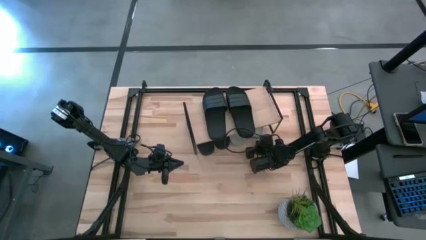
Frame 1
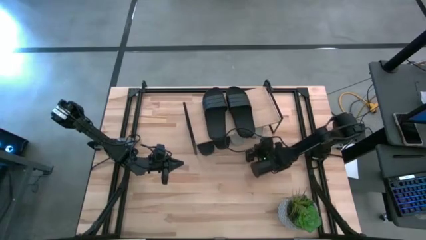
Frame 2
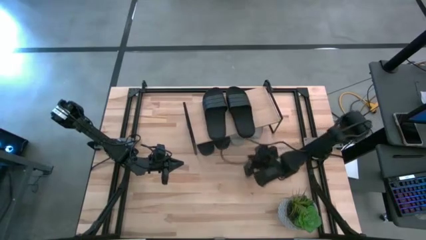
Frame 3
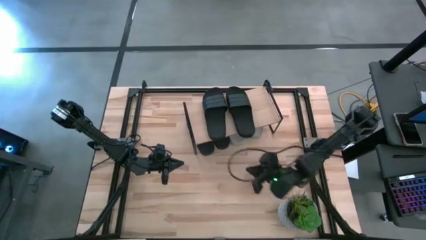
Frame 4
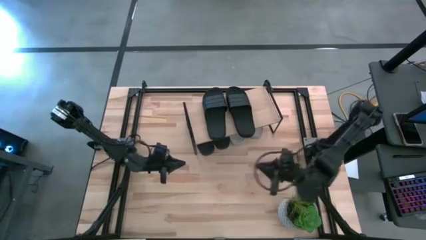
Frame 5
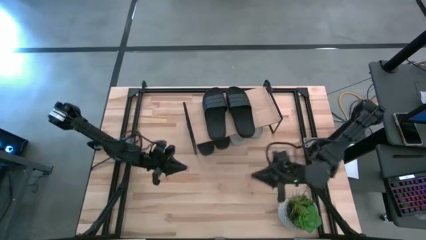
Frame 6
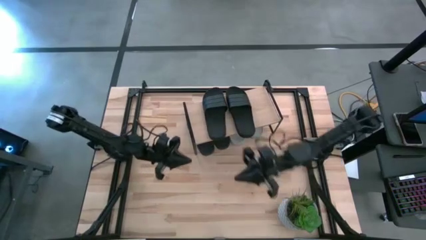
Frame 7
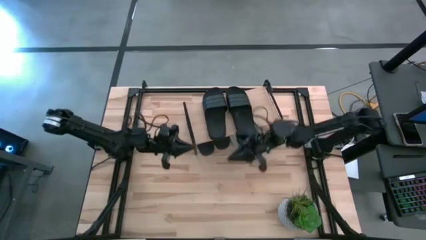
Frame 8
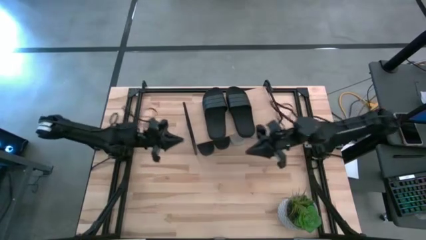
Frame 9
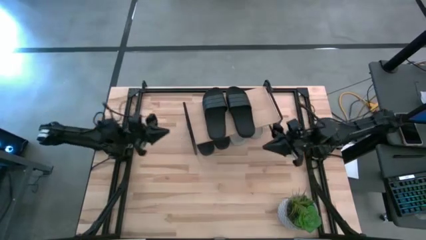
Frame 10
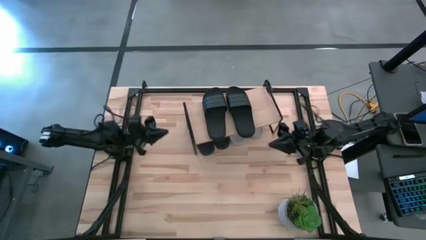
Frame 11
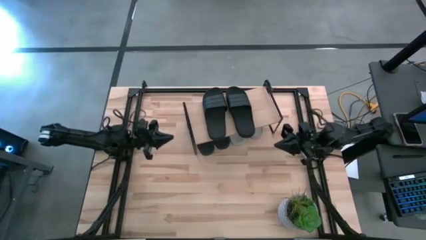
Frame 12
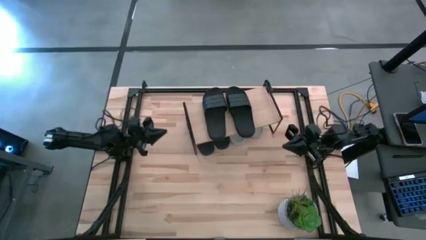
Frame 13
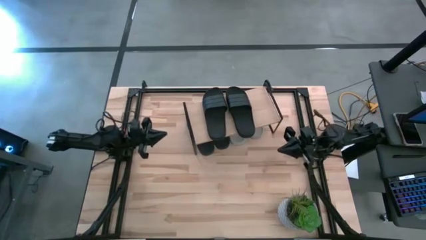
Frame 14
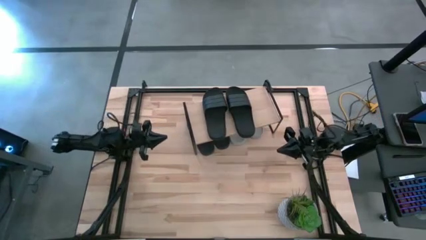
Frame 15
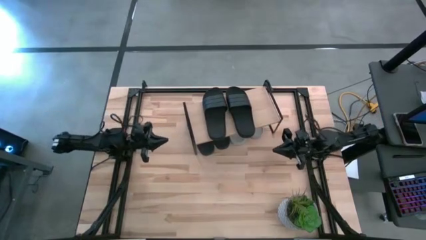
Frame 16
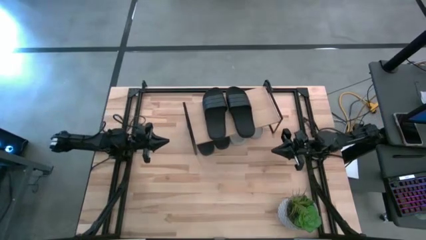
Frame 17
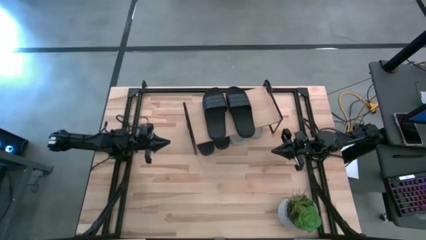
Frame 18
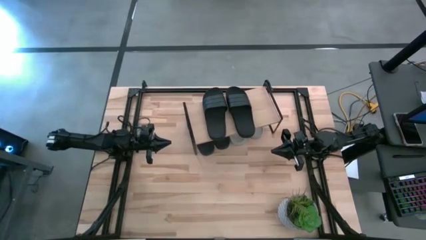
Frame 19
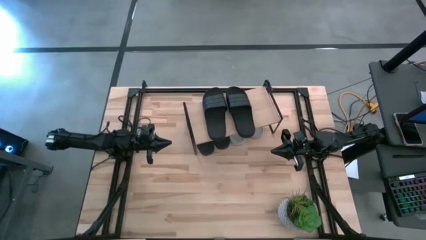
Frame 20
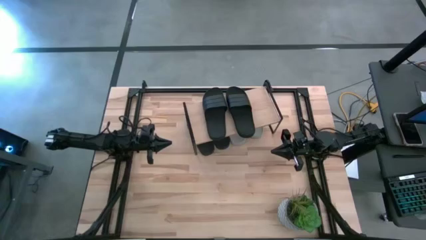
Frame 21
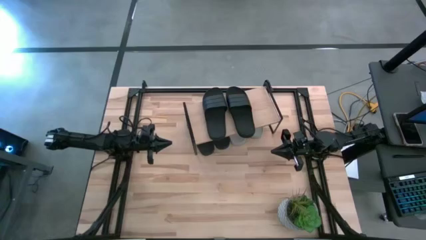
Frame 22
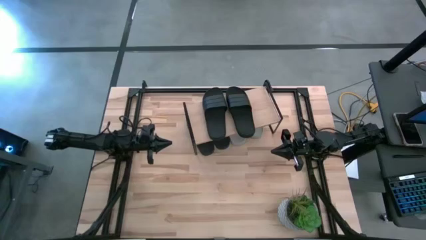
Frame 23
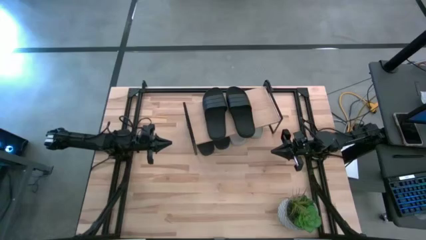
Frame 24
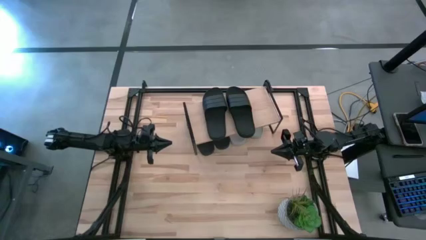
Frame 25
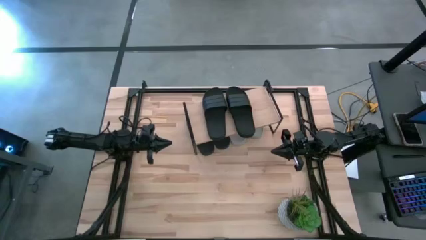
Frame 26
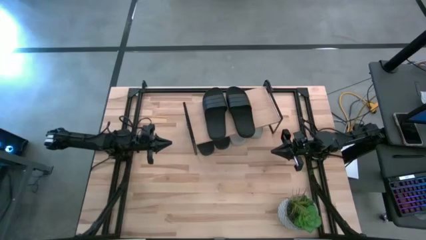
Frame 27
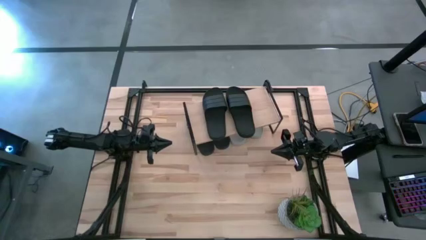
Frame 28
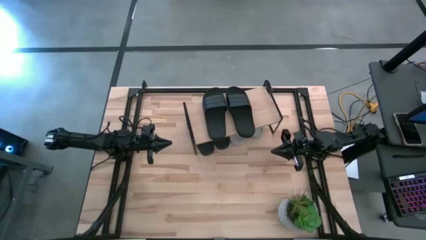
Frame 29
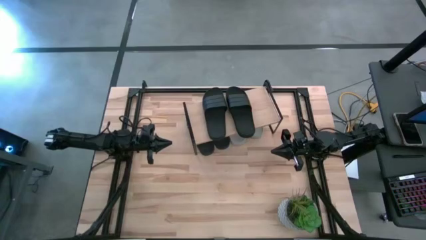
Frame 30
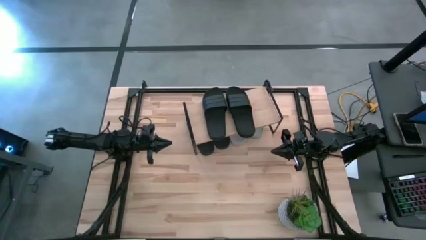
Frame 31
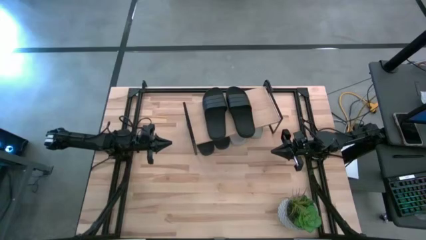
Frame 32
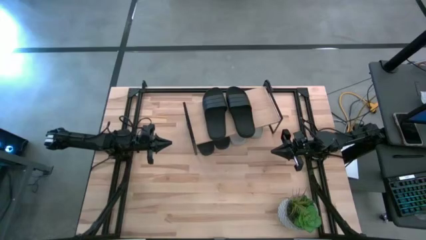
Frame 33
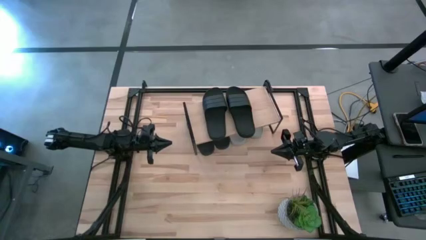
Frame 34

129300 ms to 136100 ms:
Task: Pick and place slides into the shelf
Return to Home Position

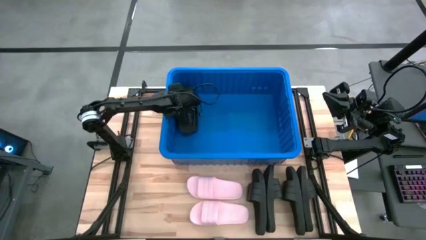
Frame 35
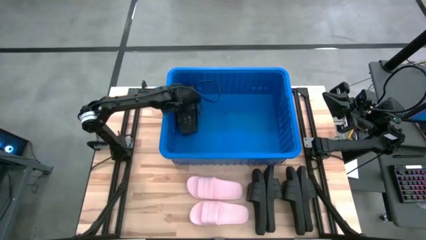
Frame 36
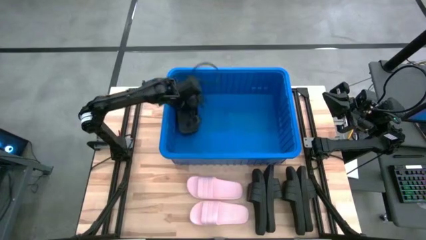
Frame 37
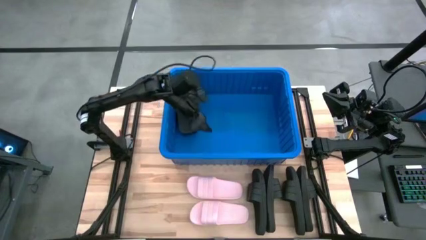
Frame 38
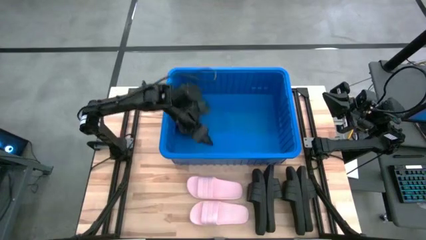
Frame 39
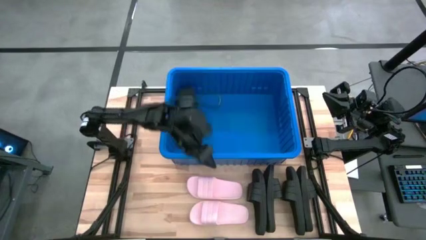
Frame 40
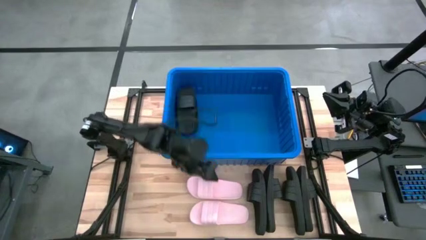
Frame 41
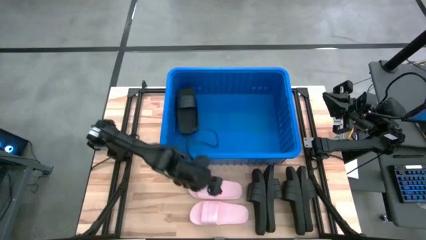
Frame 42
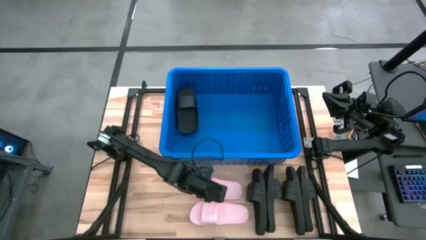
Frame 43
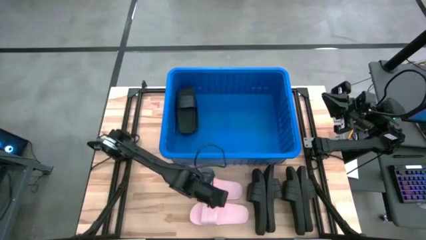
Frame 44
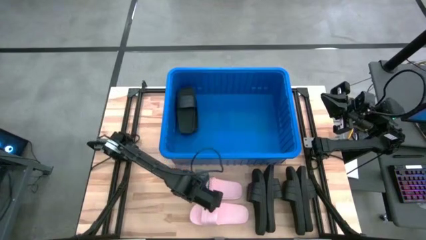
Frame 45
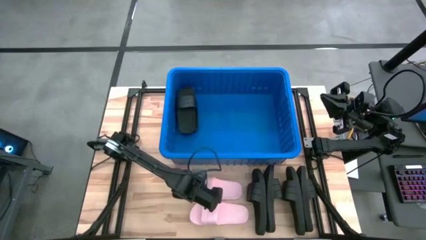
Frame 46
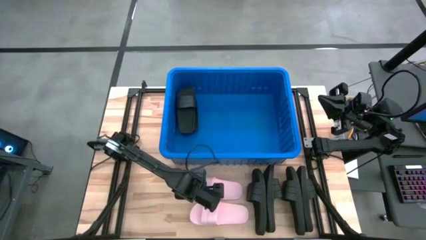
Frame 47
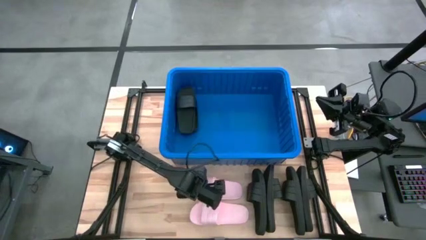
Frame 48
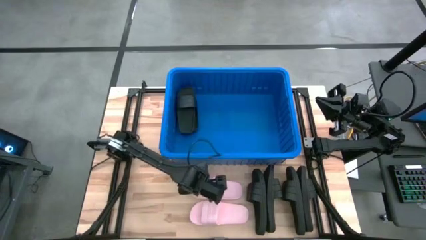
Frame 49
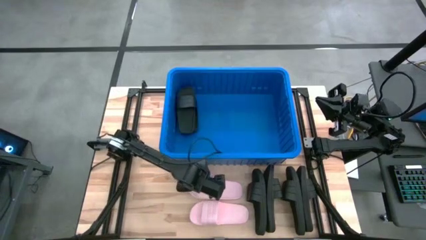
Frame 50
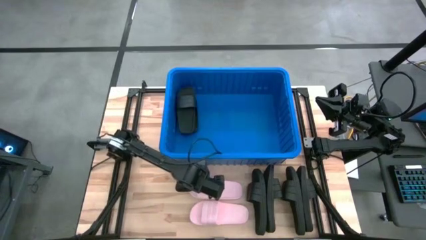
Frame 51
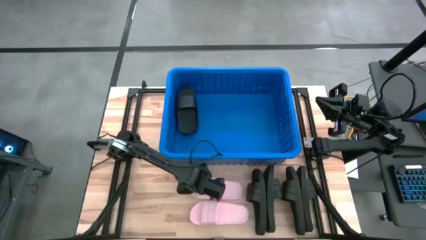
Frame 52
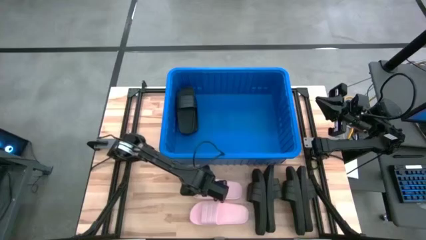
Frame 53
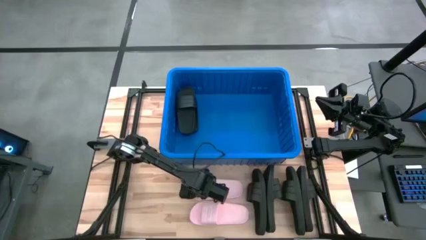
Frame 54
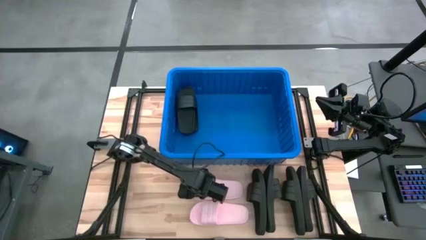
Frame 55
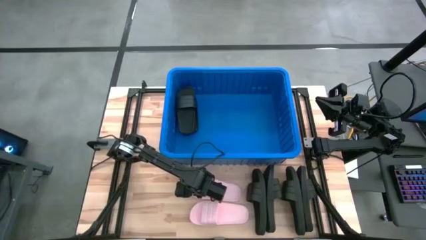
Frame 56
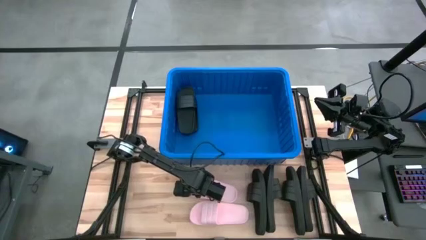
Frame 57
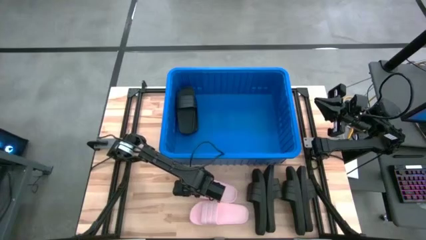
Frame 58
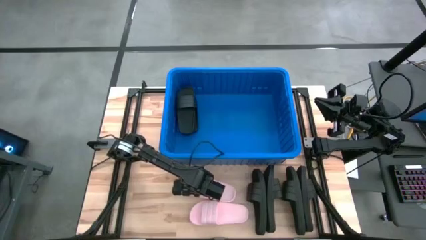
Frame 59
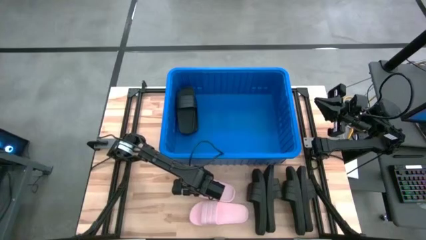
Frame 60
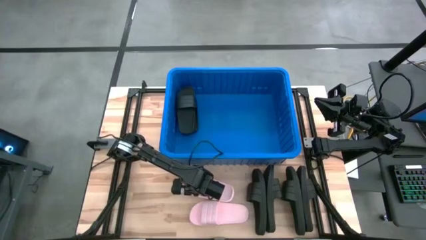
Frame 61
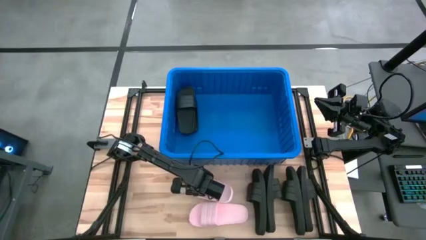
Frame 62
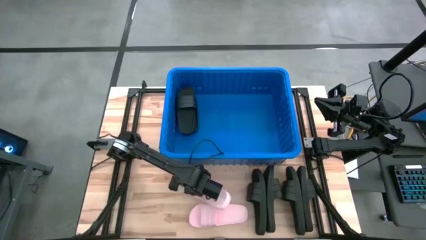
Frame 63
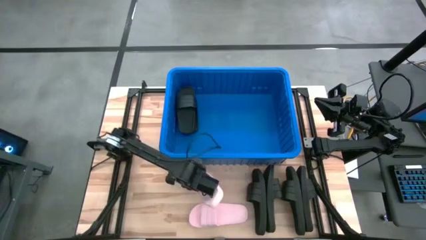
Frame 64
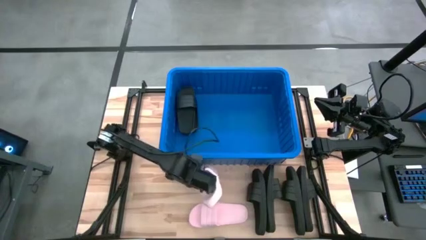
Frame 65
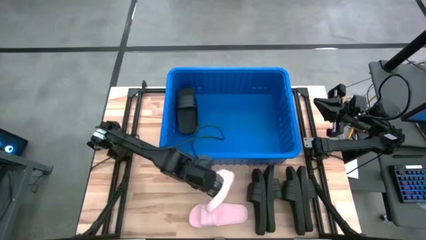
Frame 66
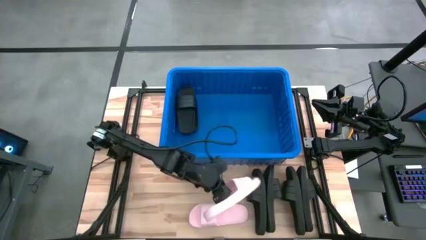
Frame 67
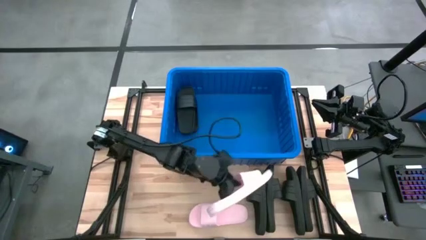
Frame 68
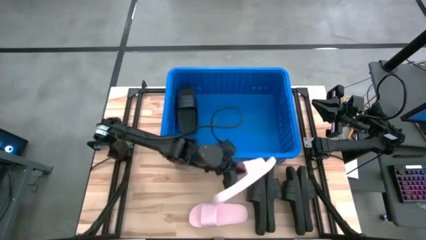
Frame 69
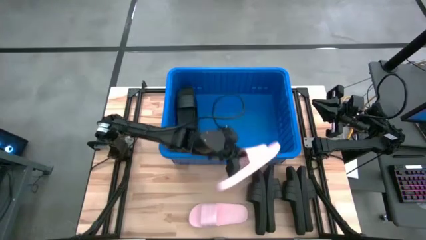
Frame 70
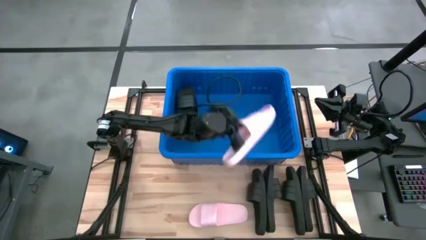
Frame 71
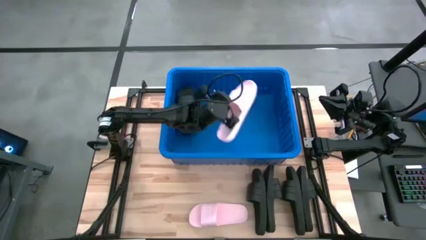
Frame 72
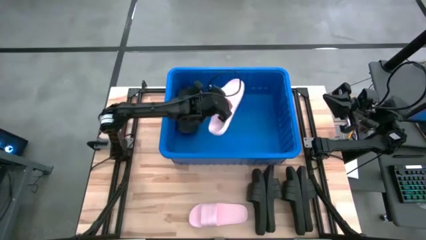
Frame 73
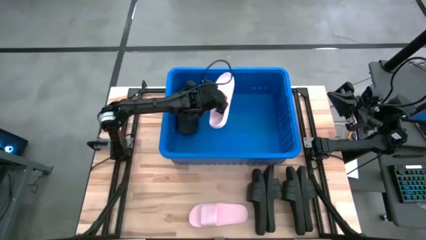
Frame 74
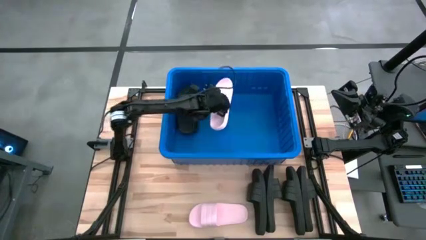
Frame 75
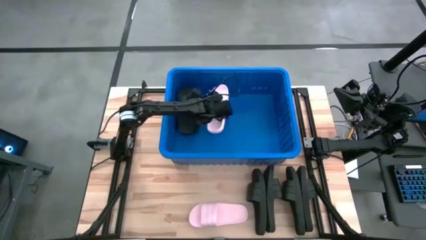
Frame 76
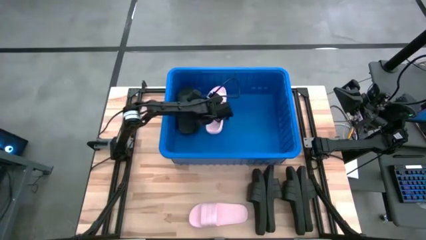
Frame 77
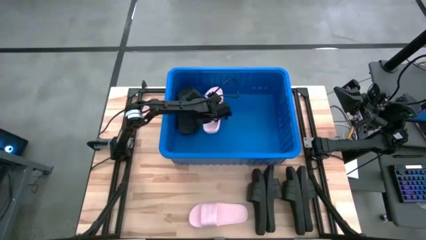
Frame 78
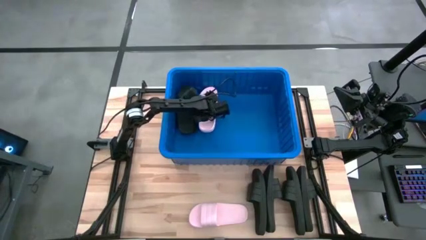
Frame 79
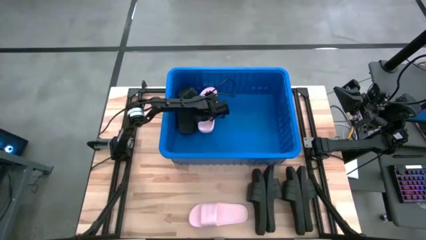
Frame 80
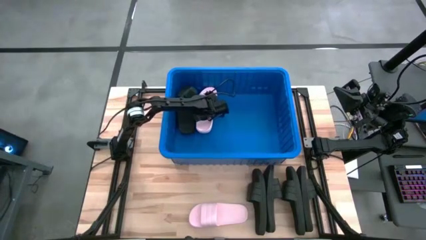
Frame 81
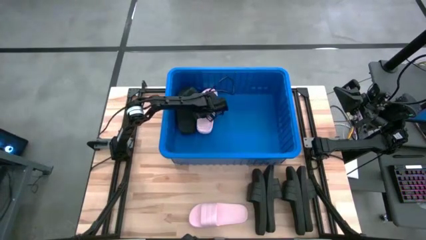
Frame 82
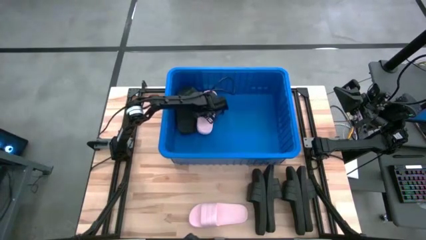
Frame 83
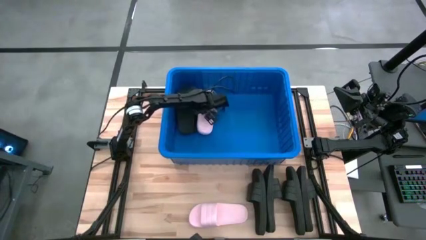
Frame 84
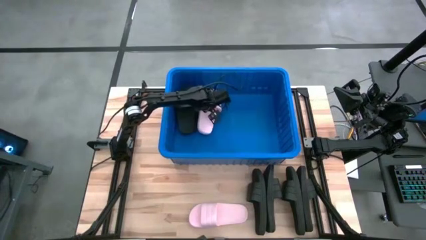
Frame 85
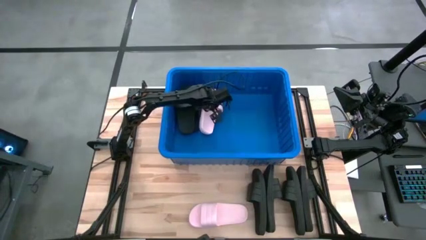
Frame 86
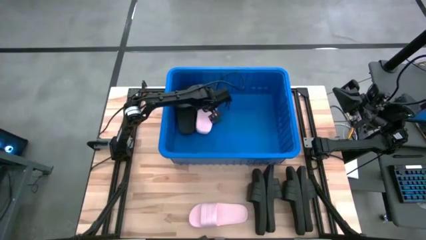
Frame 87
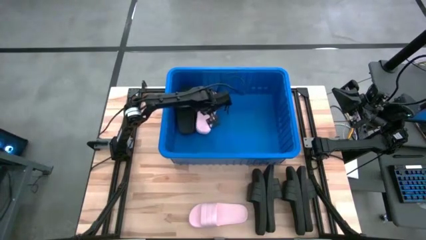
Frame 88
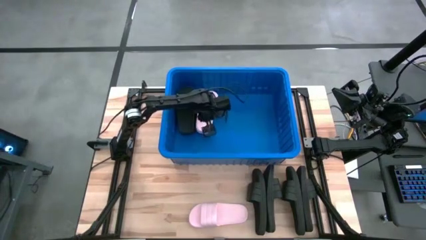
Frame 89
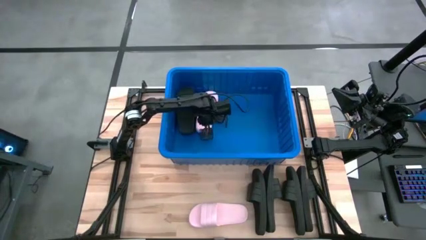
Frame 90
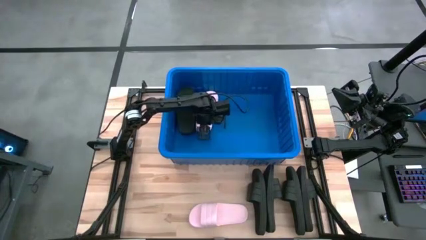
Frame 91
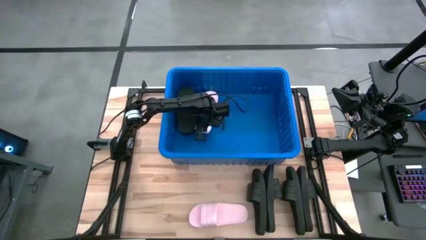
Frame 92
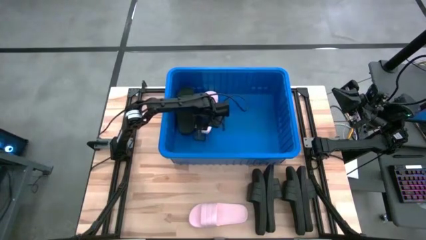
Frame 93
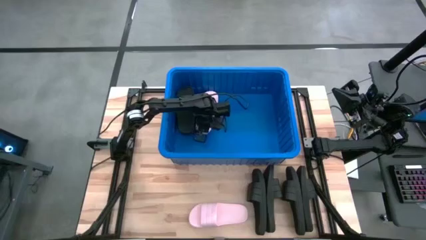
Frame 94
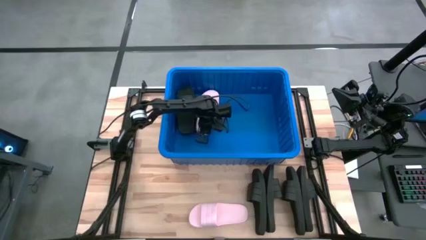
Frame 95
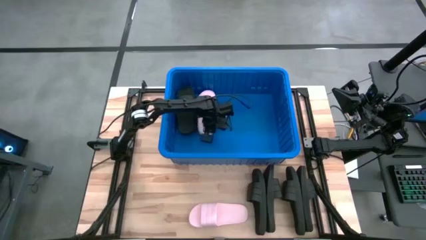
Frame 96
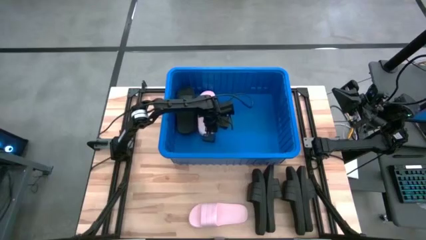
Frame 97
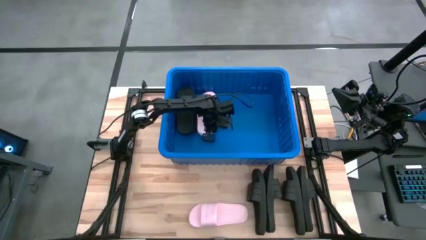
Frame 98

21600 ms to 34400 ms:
Task: Pick and place slides into bin
Put the pink slide into the blue container
